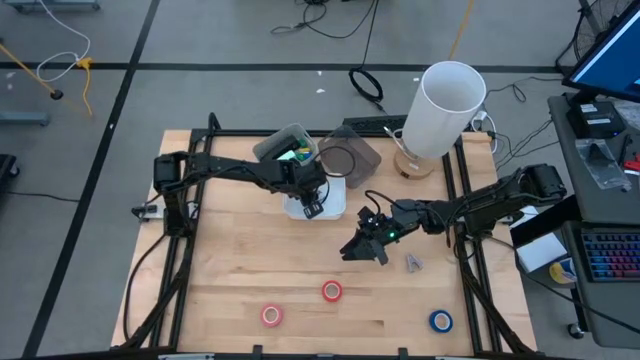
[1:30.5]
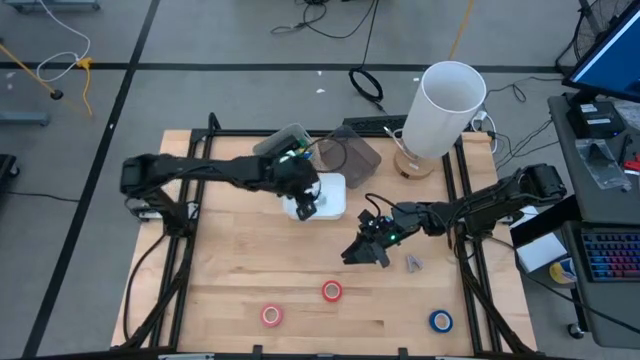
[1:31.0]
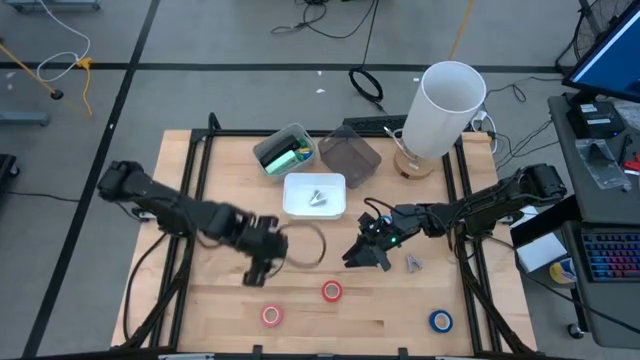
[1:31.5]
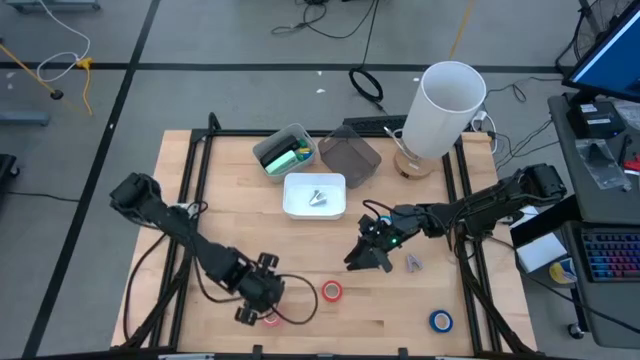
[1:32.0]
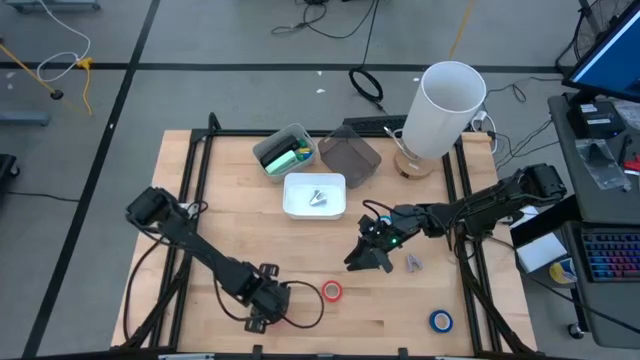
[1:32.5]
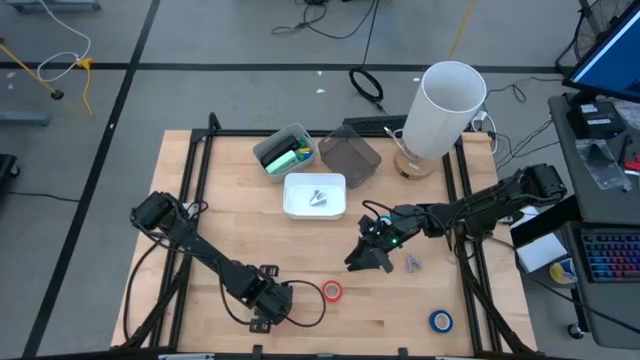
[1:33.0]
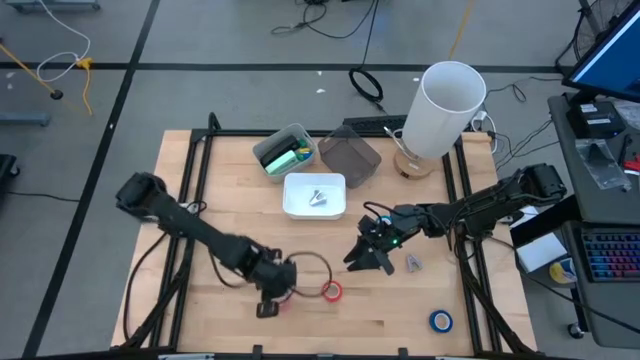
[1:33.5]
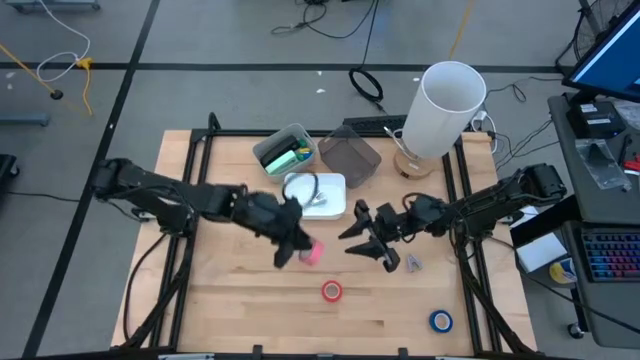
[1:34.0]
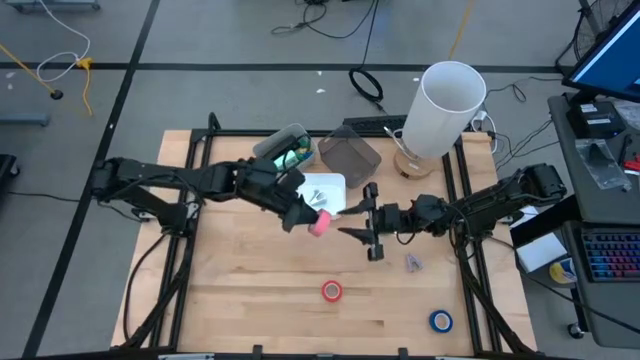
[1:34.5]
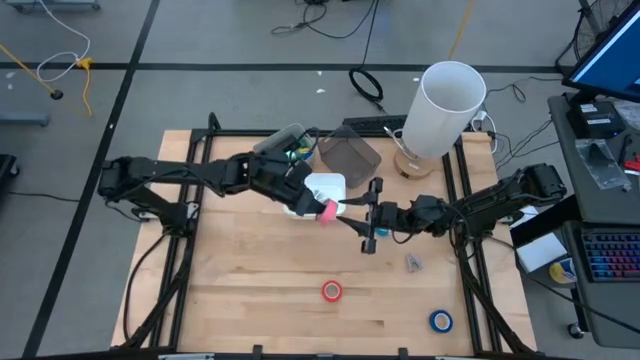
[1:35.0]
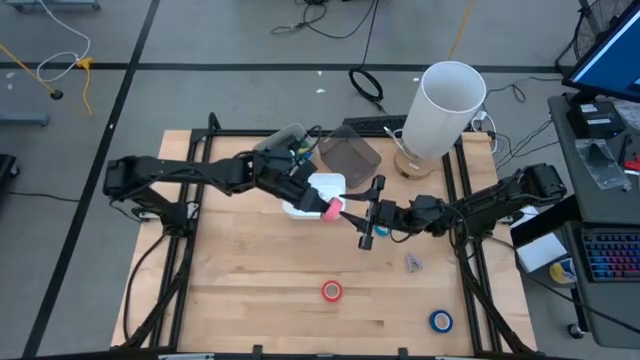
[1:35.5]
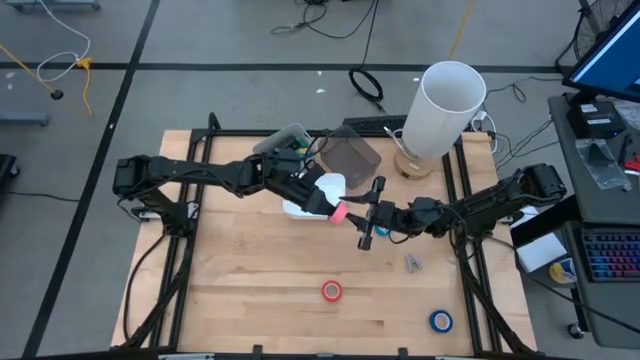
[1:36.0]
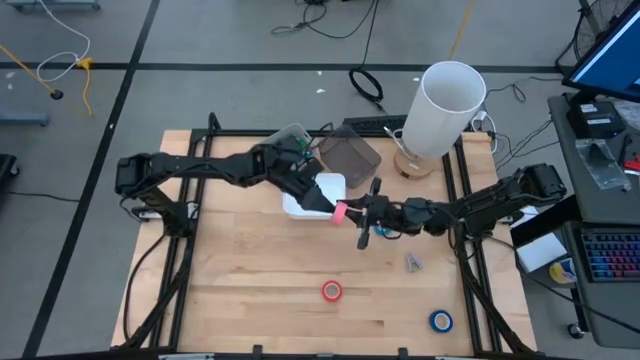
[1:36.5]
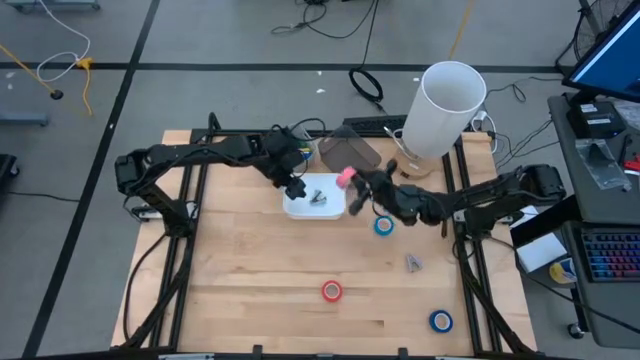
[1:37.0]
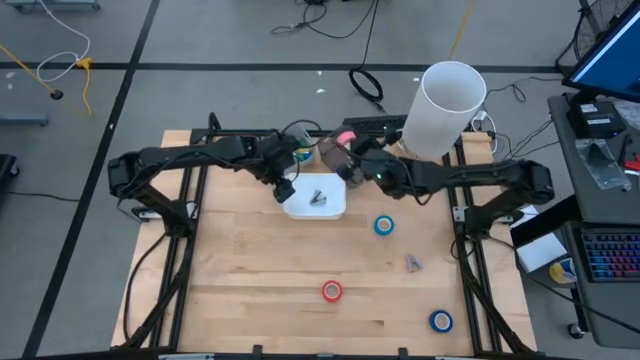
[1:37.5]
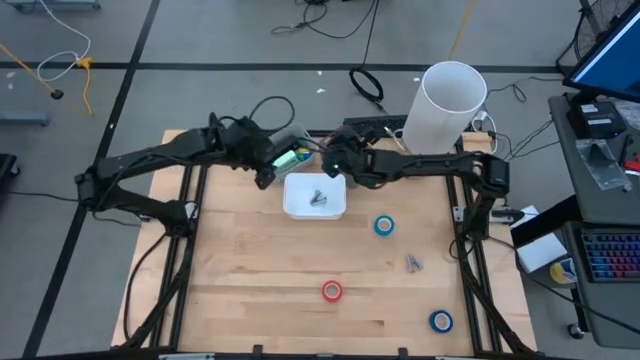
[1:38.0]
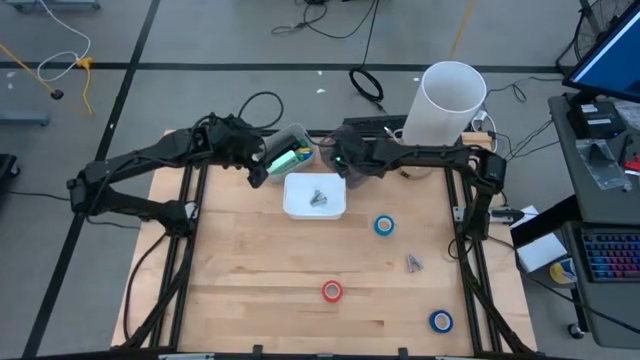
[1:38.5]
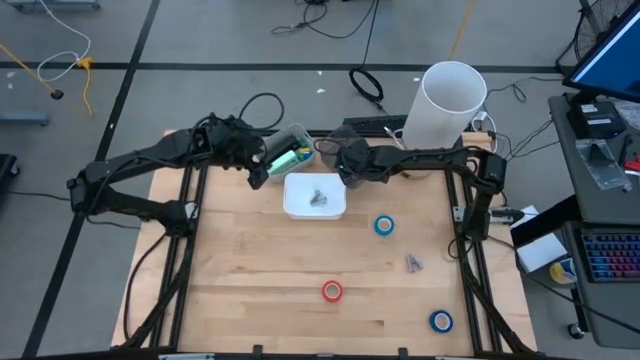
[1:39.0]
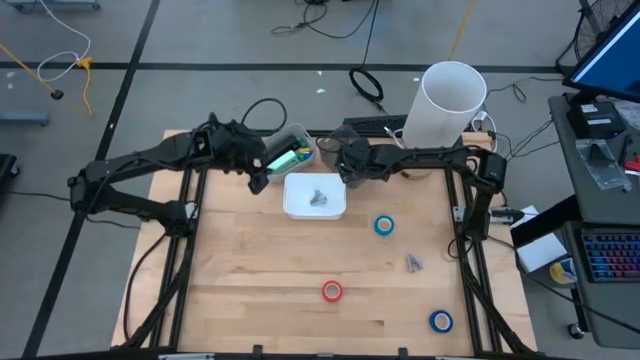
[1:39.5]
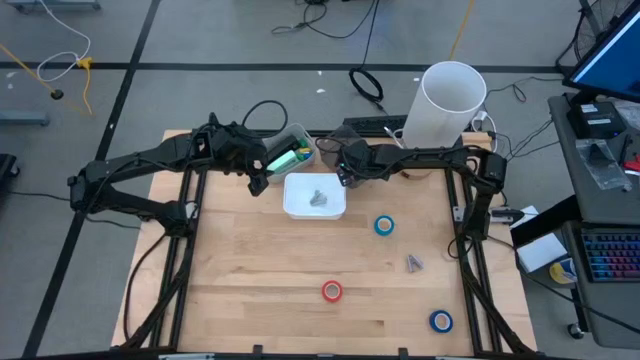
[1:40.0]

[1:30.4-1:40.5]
Task: Pick and place Stapler, Stapler remover, tape
Put the pink tape into the black bin

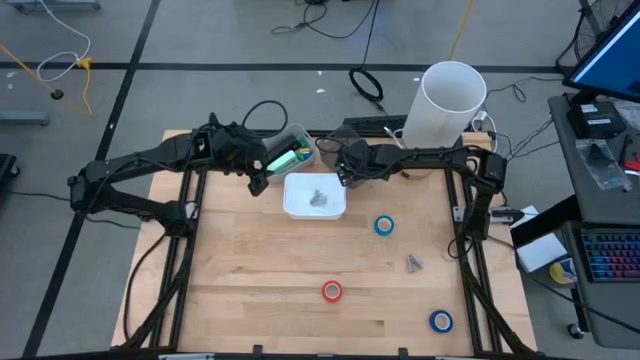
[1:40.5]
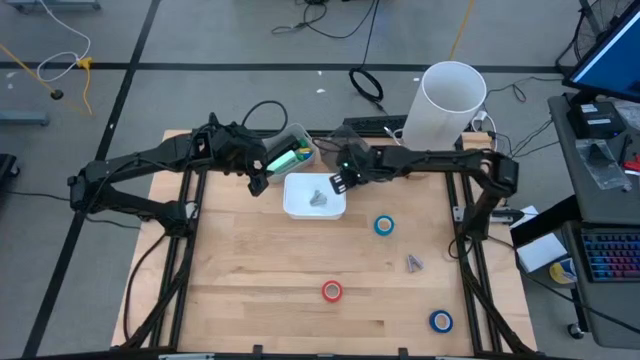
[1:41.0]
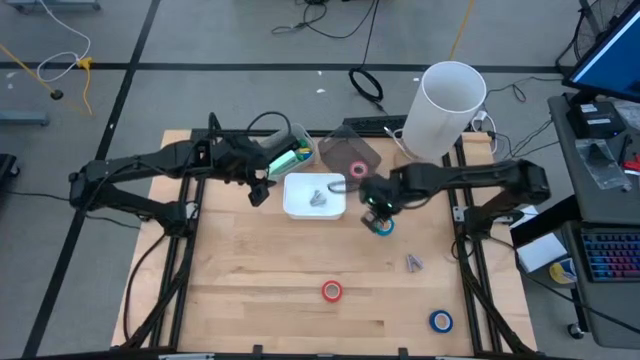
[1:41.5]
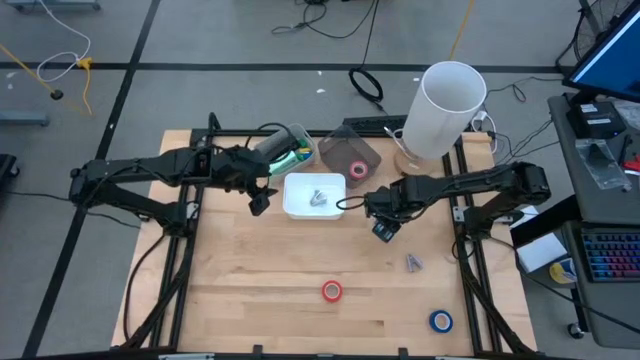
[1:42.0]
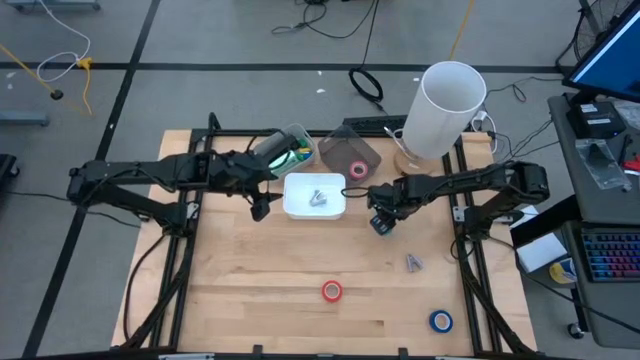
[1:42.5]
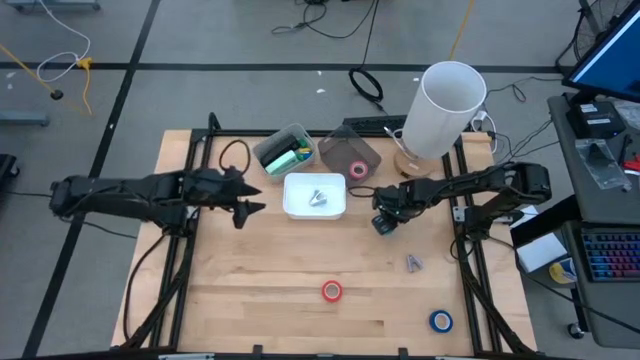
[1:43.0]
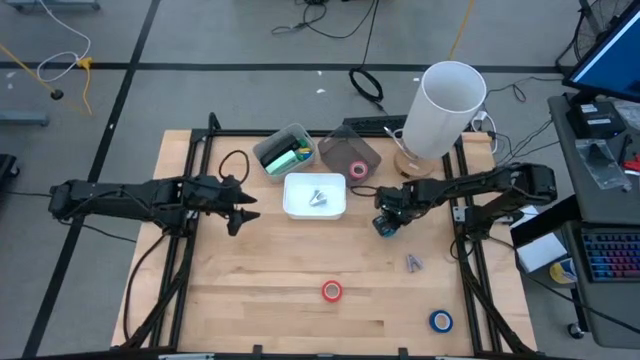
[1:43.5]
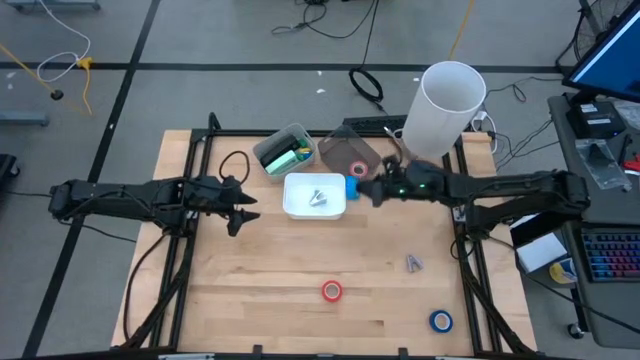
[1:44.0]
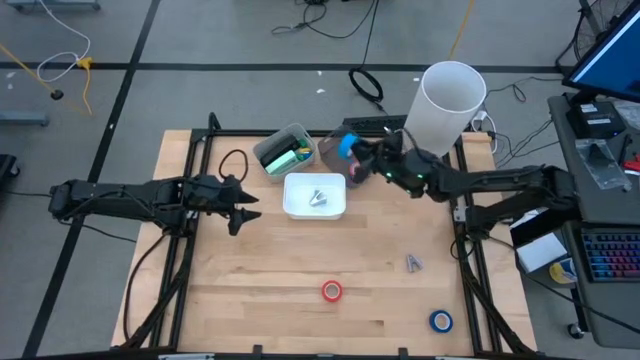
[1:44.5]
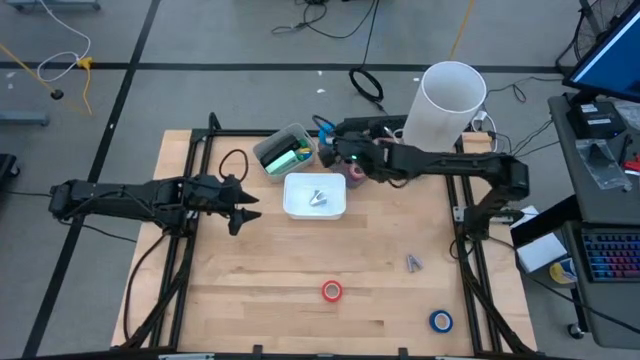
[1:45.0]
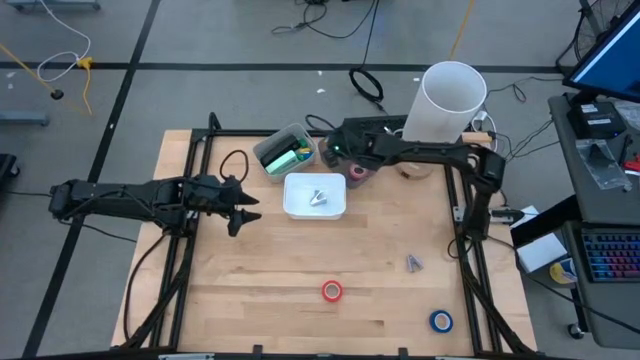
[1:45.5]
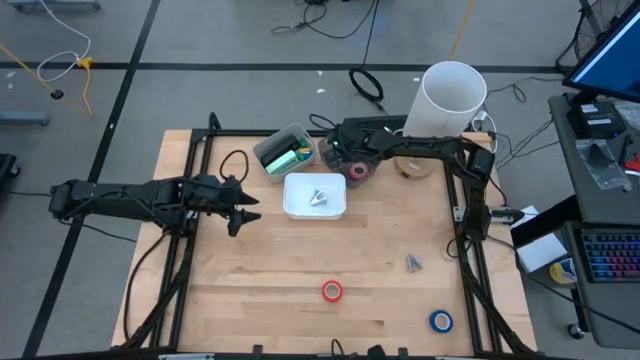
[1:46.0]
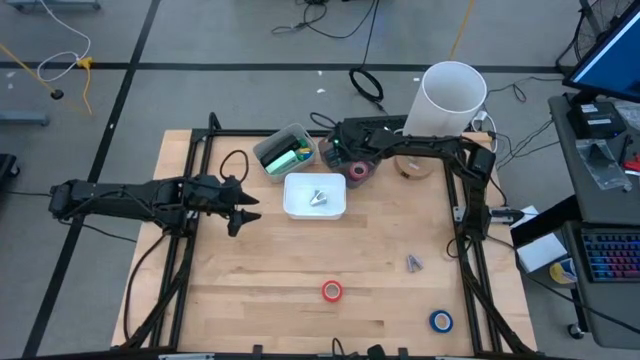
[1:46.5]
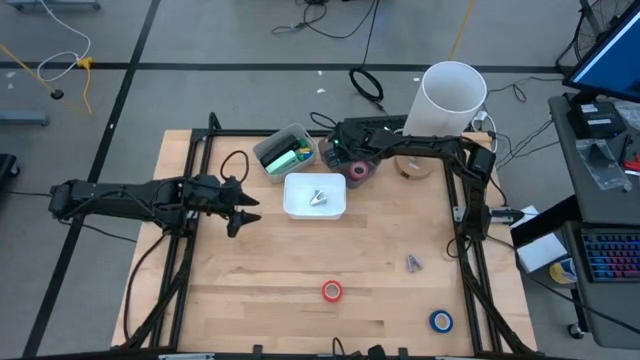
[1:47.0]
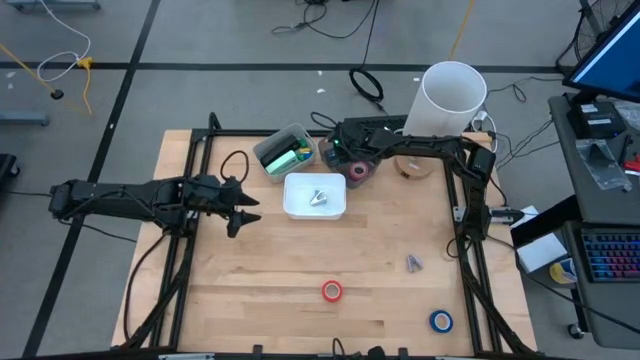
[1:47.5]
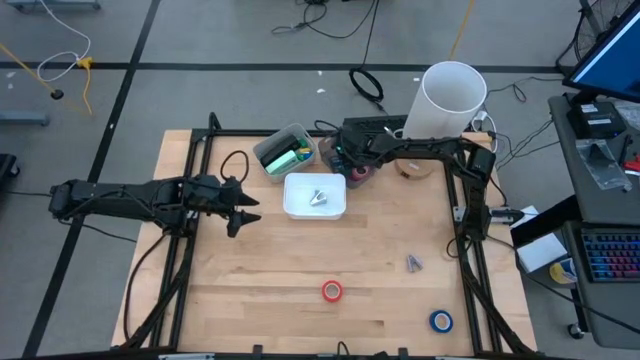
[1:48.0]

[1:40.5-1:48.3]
Put the light blue tape into the black bin
